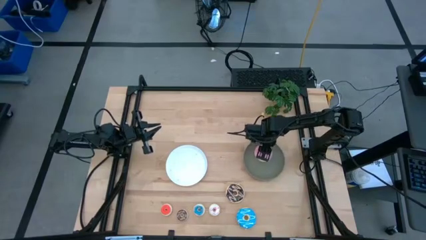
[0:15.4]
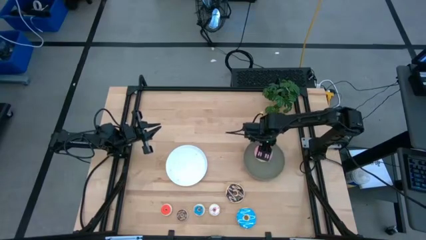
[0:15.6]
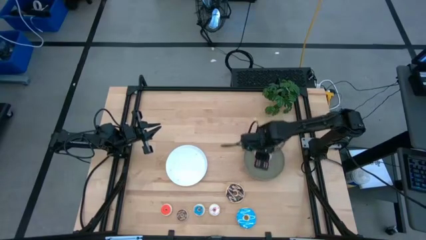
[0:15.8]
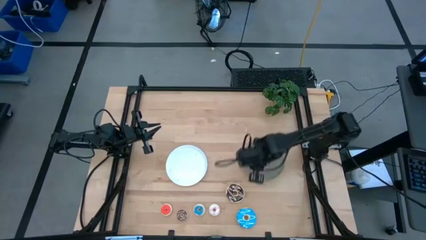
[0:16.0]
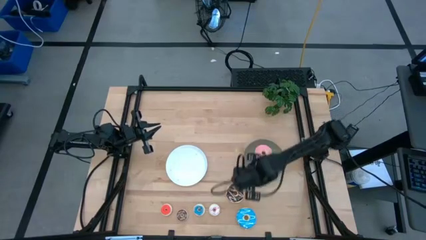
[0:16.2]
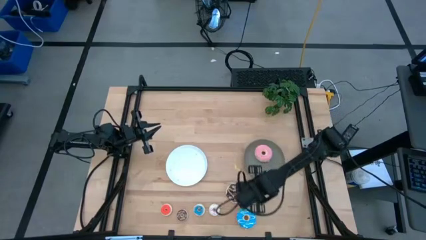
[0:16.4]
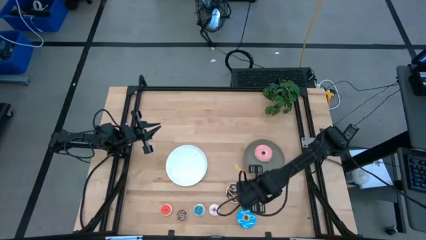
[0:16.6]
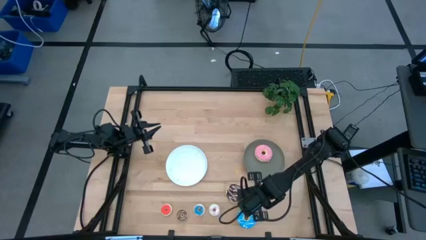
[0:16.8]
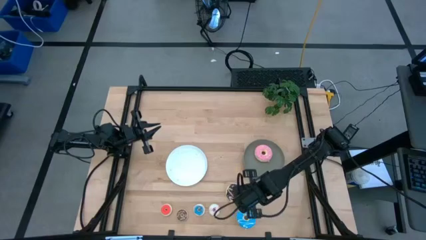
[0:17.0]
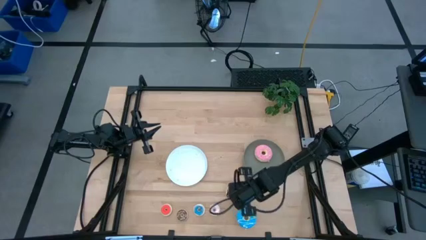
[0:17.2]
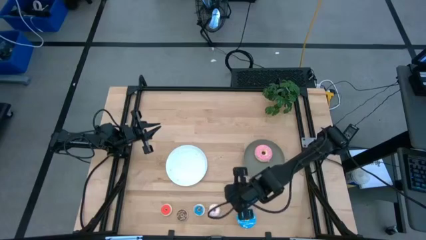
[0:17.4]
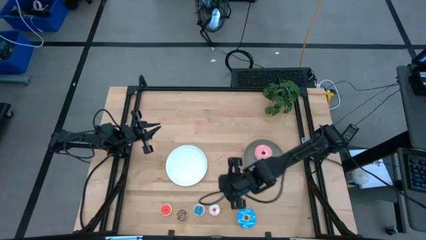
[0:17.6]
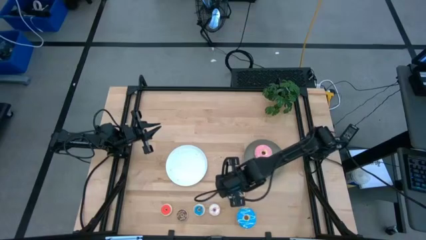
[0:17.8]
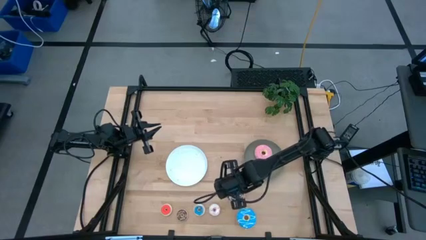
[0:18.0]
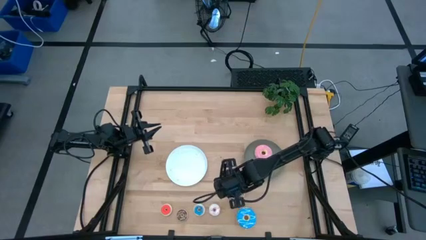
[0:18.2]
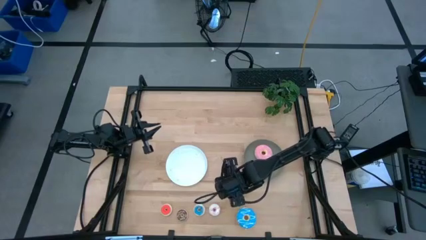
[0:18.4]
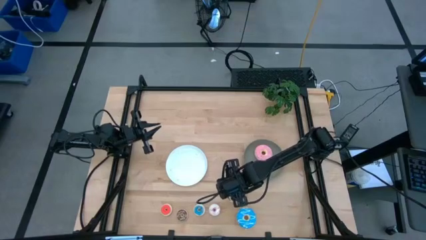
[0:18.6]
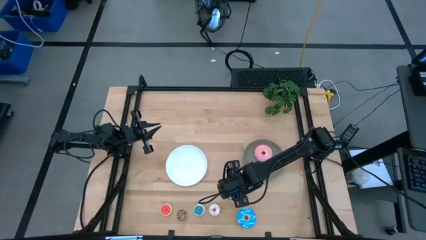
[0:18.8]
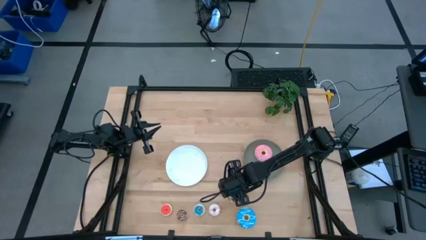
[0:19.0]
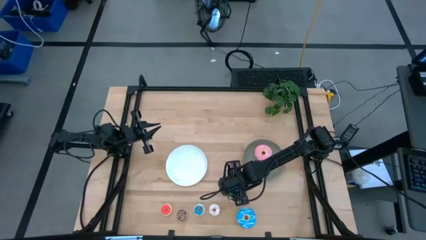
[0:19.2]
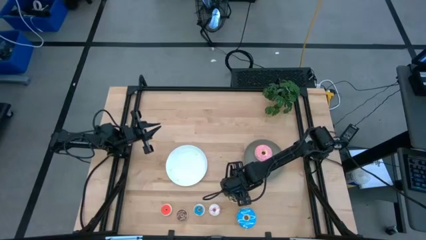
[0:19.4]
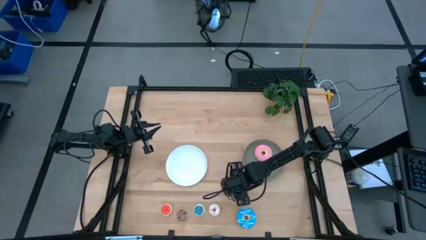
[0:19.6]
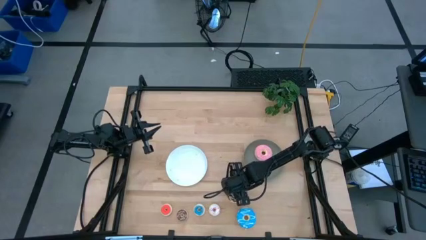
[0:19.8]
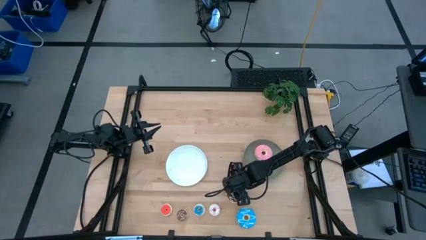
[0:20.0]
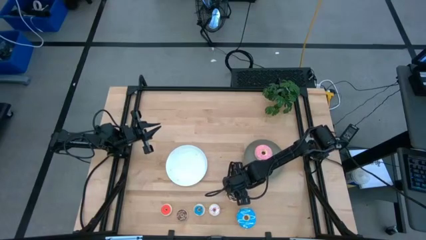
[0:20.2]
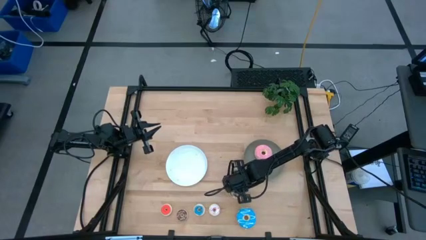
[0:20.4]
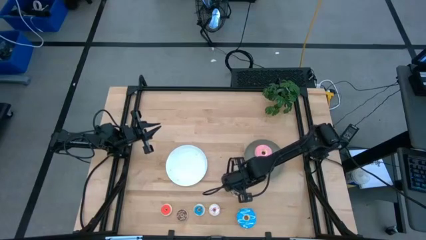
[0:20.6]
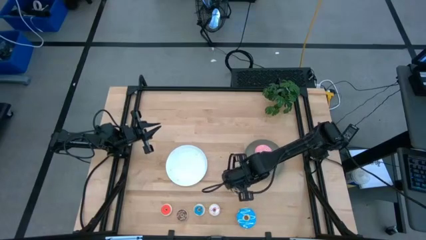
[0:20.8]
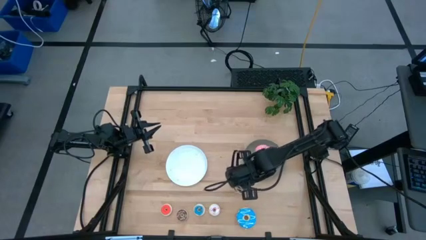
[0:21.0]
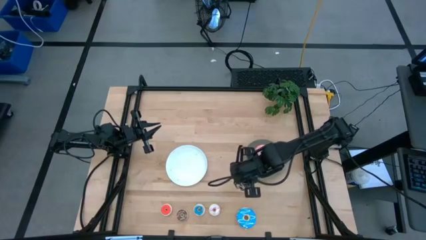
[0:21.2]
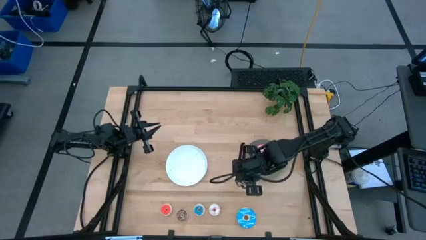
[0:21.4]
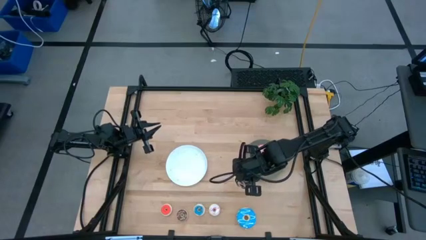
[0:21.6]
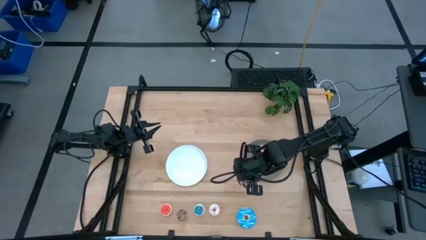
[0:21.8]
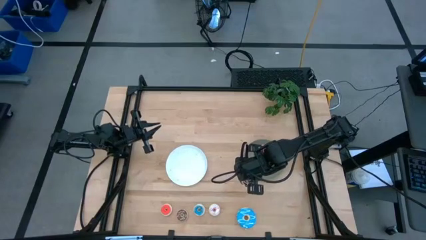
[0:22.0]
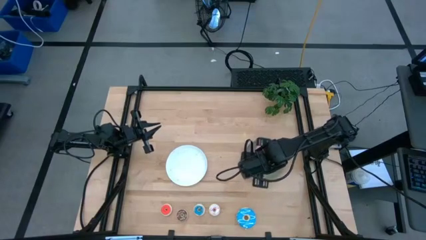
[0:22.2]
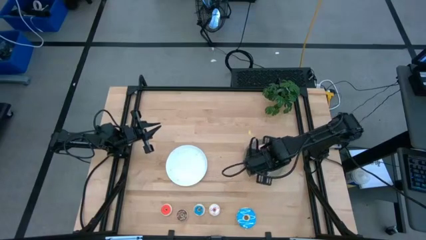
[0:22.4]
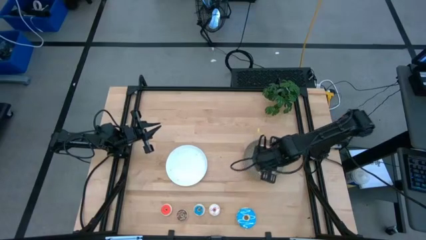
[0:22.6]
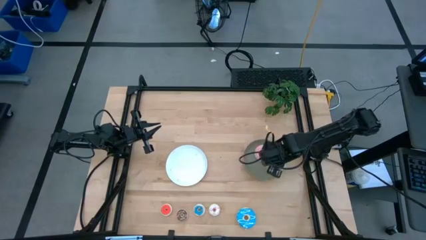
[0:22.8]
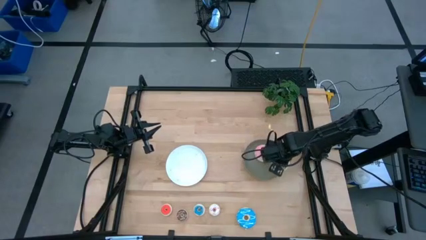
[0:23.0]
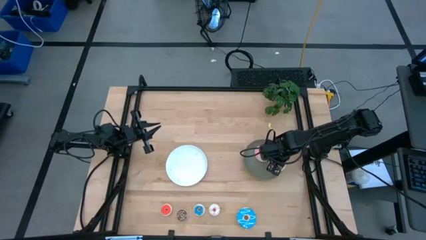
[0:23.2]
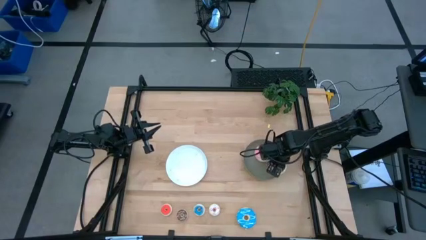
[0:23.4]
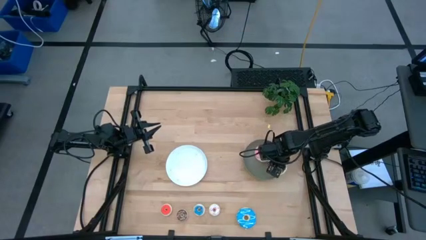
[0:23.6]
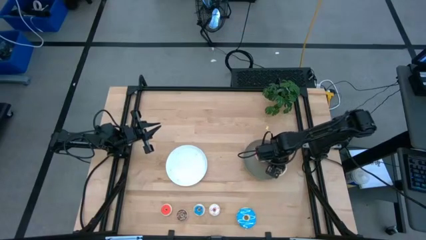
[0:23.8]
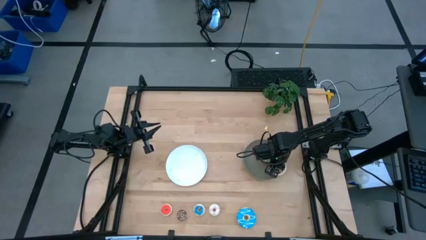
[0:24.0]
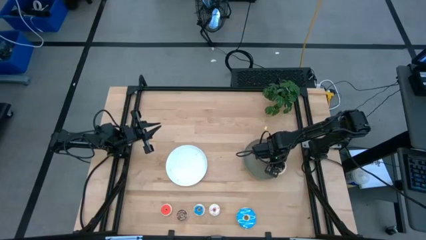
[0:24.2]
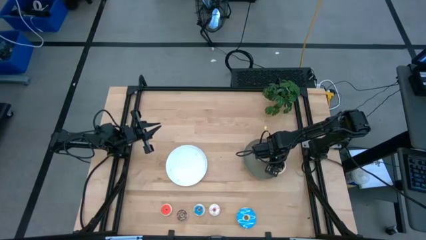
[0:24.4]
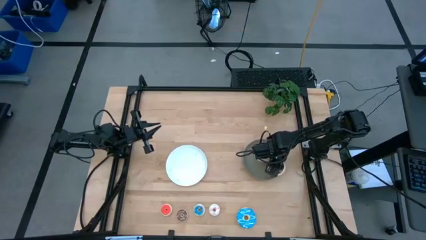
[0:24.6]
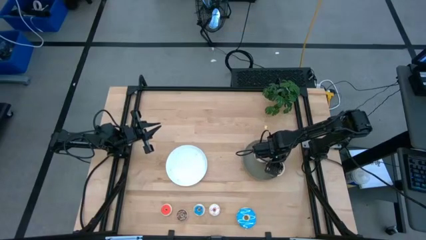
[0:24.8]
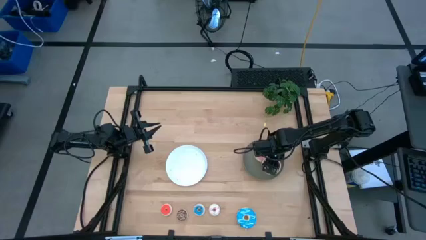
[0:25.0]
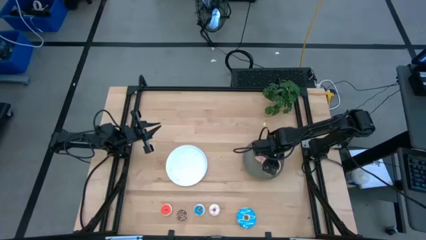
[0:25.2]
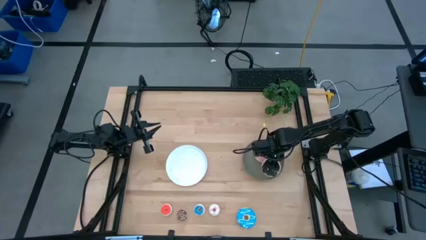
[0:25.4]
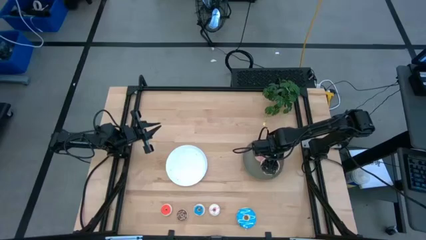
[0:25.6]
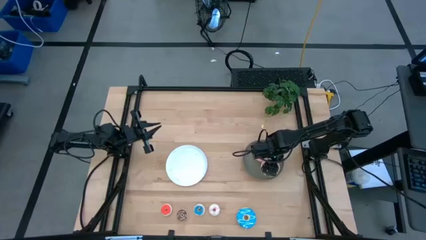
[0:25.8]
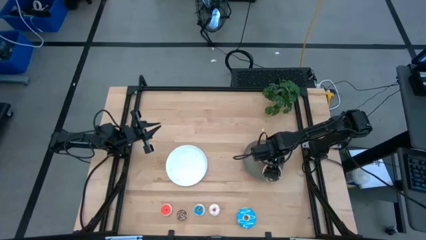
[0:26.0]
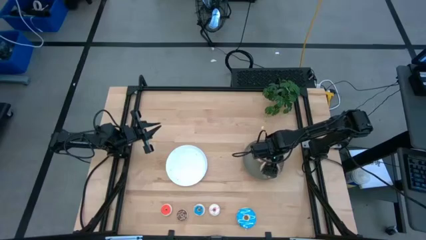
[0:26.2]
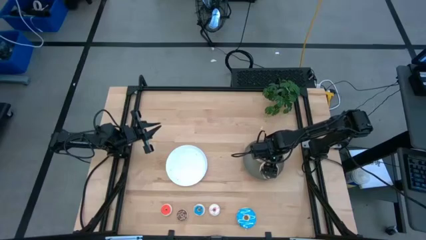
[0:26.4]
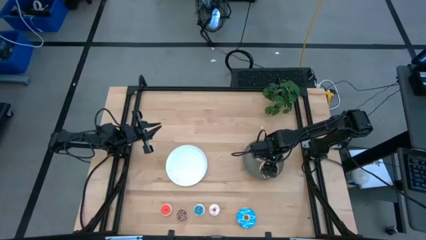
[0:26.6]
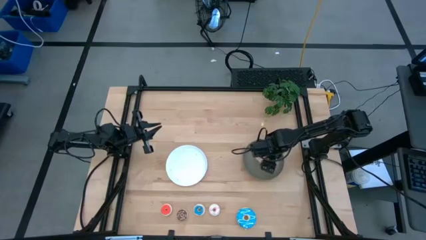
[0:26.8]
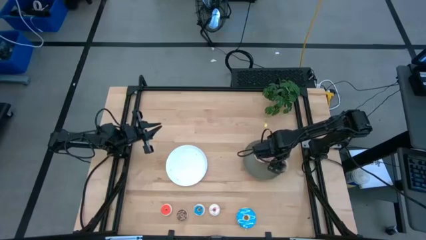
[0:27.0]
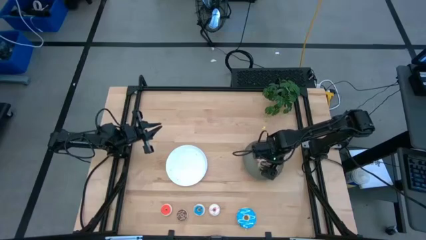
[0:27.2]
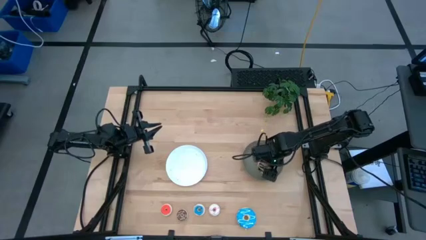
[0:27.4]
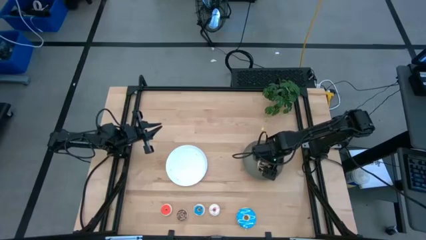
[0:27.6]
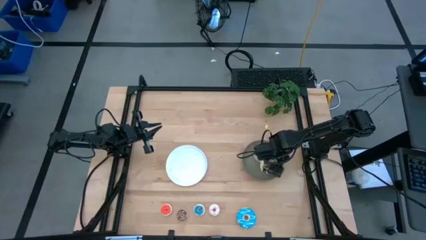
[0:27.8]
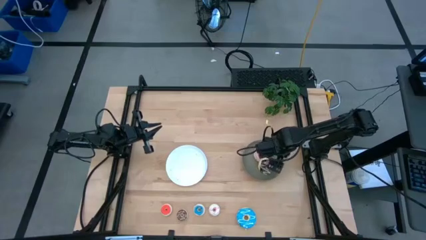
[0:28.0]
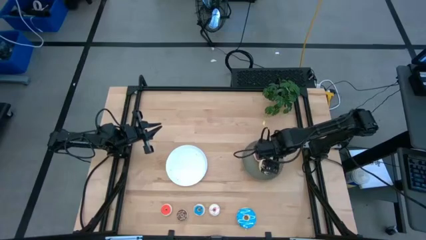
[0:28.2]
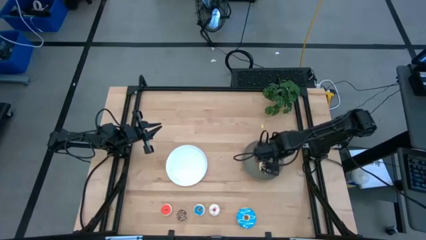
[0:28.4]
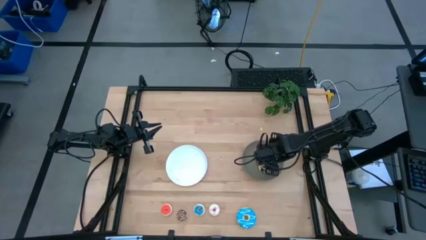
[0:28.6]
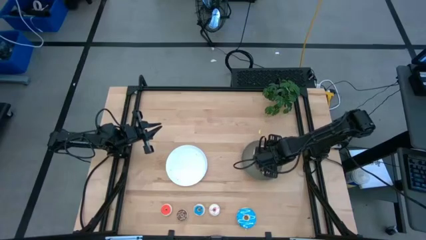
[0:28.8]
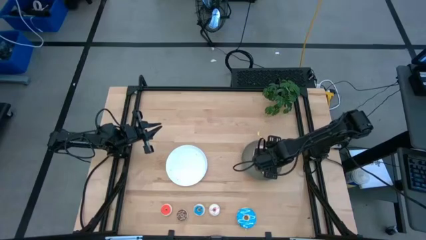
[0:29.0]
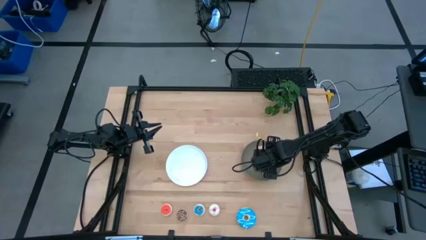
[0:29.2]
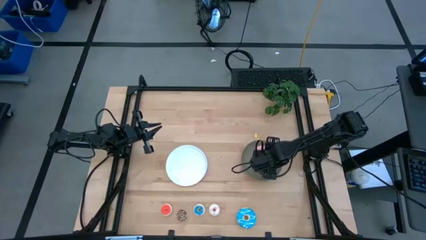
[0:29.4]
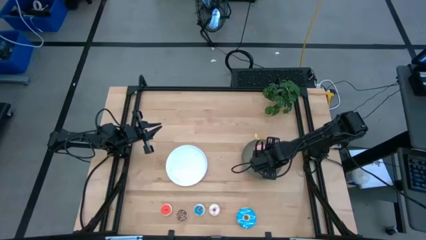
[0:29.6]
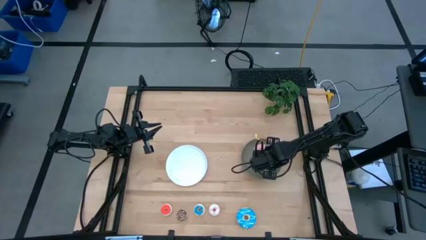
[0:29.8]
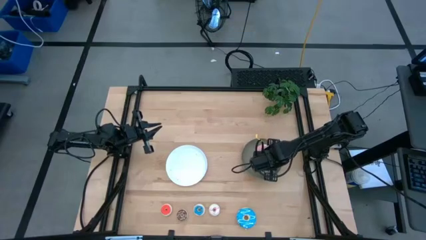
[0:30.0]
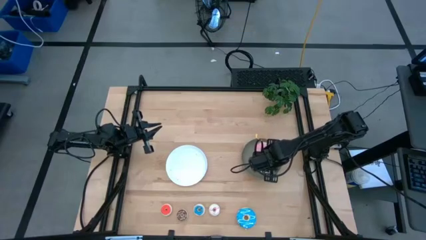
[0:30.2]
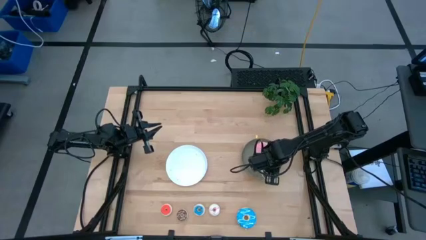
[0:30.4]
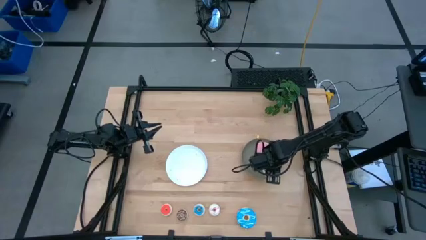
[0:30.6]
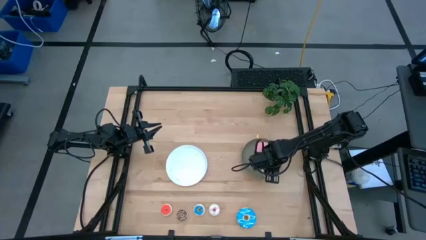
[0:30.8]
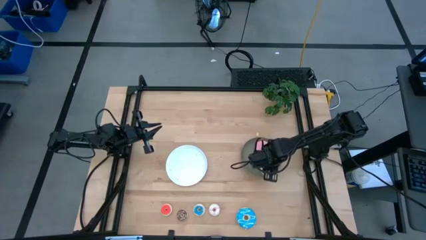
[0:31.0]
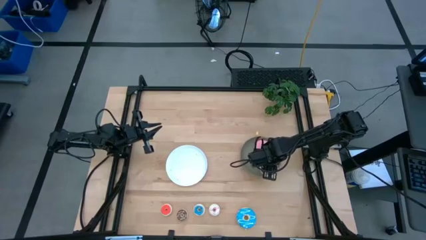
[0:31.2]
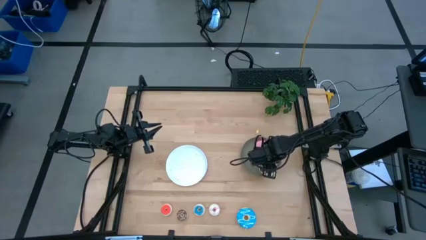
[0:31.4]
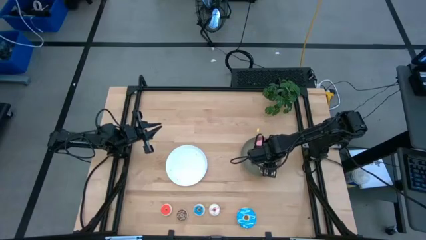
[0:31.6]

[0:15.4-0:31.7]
Task: Pick & Place donuts
Put the big black donut on the gray plate
